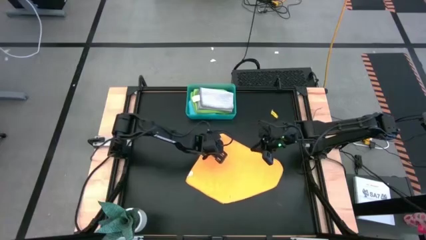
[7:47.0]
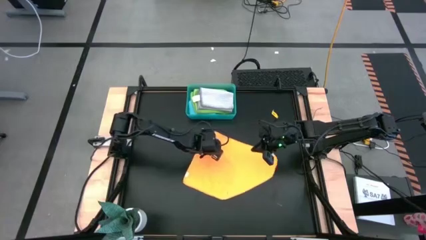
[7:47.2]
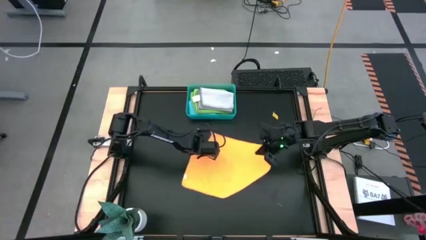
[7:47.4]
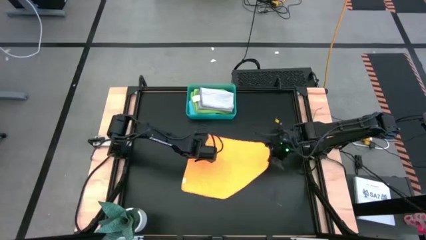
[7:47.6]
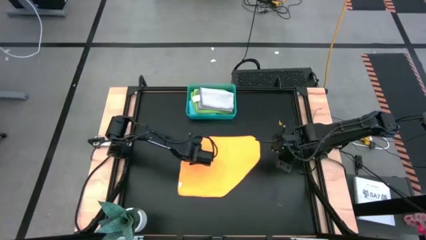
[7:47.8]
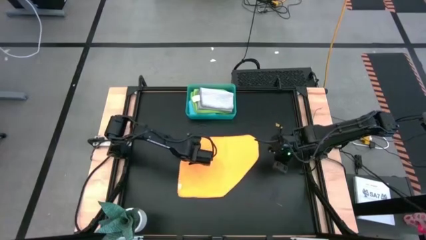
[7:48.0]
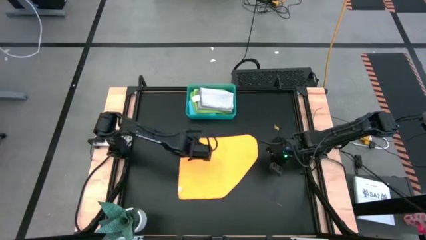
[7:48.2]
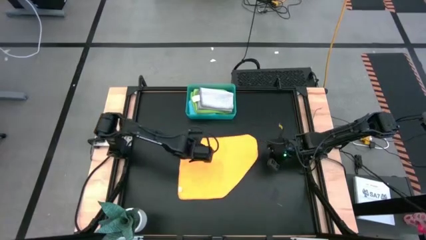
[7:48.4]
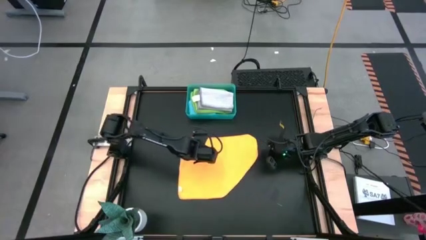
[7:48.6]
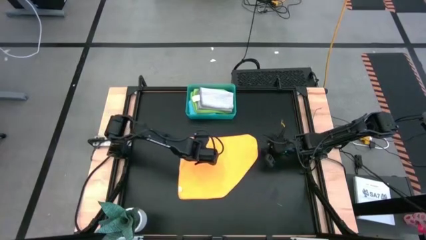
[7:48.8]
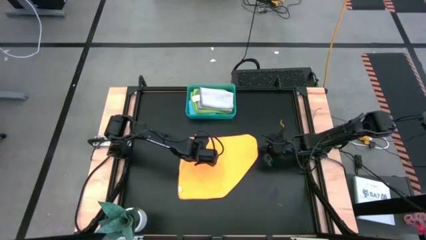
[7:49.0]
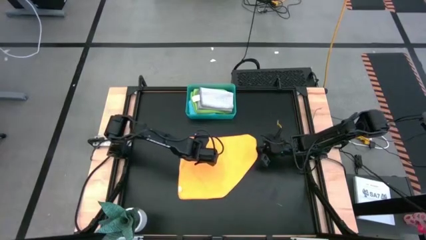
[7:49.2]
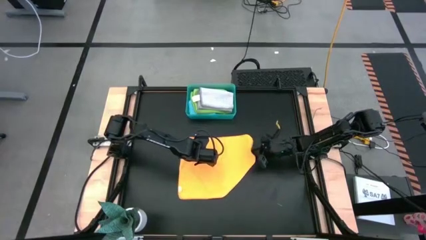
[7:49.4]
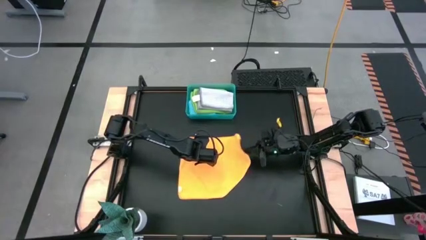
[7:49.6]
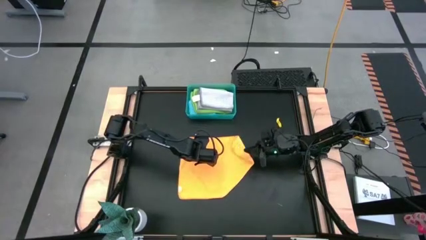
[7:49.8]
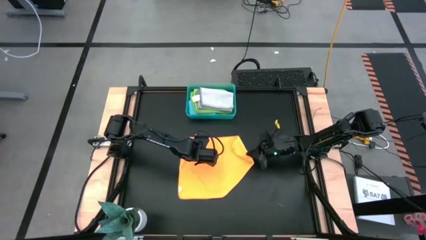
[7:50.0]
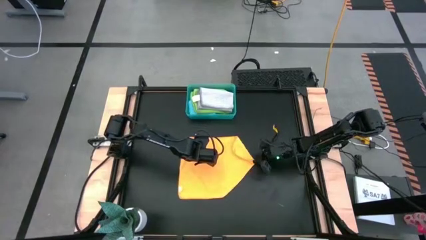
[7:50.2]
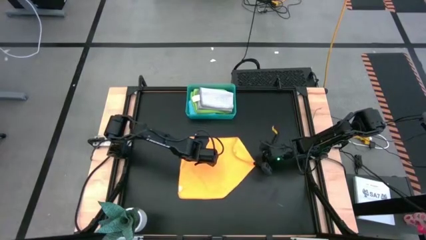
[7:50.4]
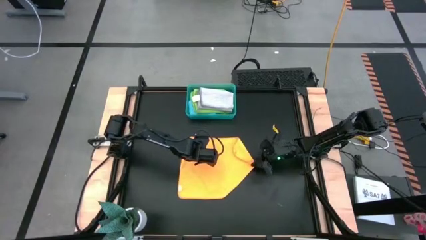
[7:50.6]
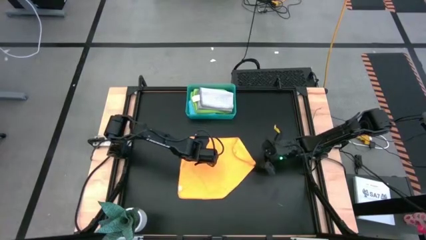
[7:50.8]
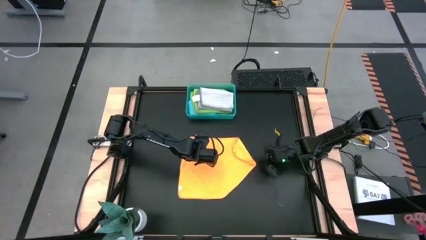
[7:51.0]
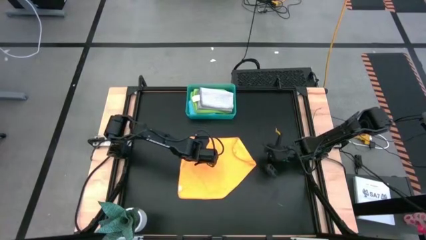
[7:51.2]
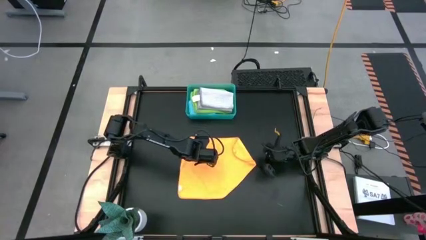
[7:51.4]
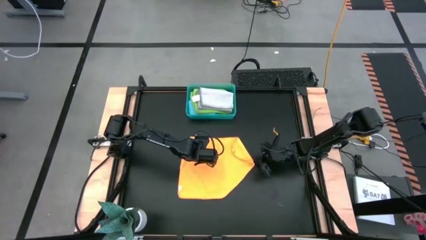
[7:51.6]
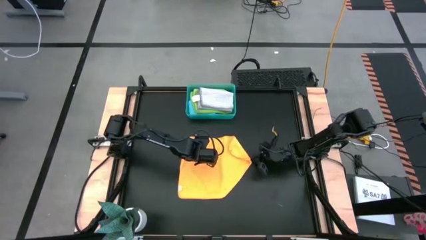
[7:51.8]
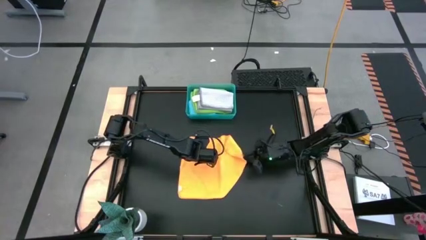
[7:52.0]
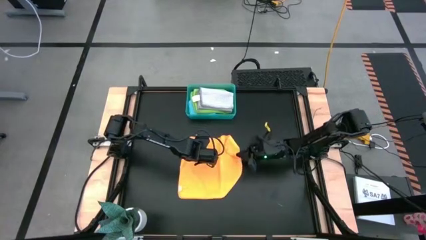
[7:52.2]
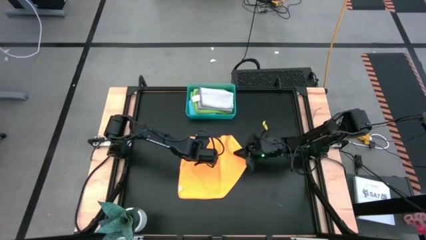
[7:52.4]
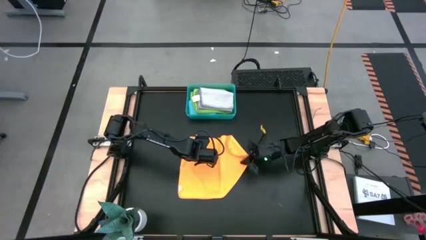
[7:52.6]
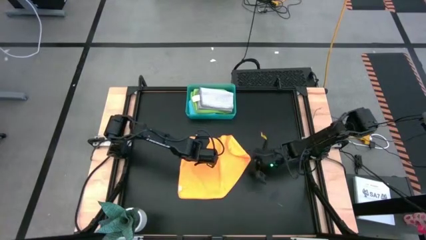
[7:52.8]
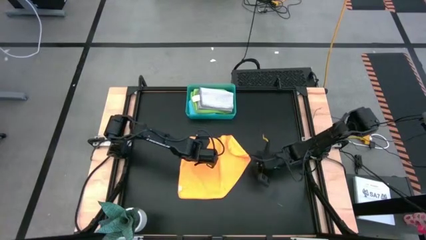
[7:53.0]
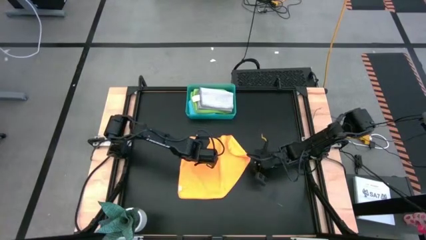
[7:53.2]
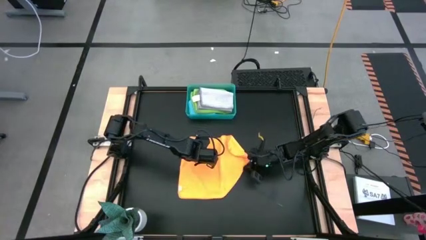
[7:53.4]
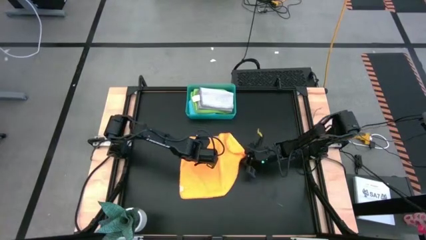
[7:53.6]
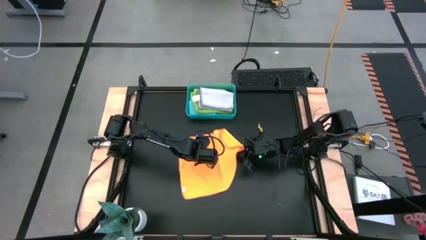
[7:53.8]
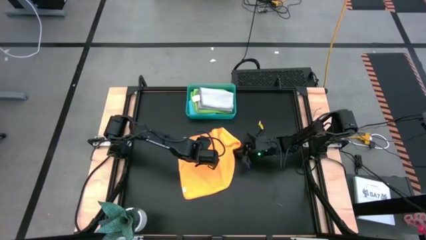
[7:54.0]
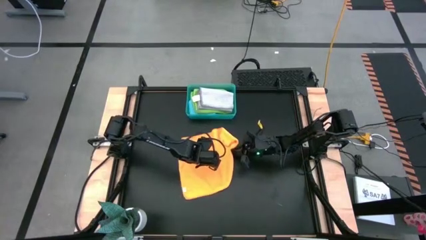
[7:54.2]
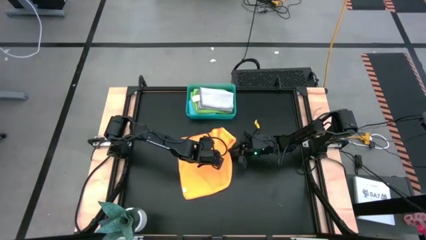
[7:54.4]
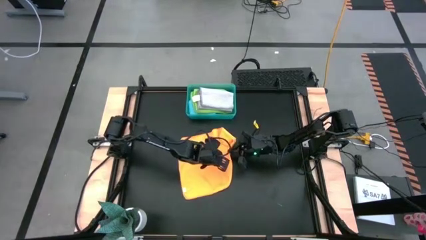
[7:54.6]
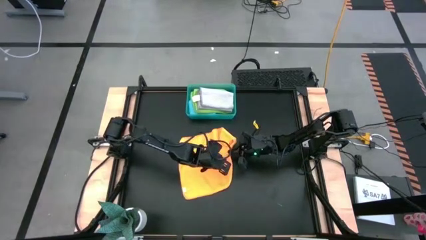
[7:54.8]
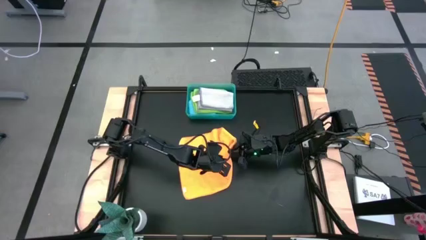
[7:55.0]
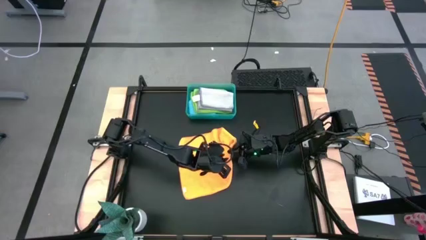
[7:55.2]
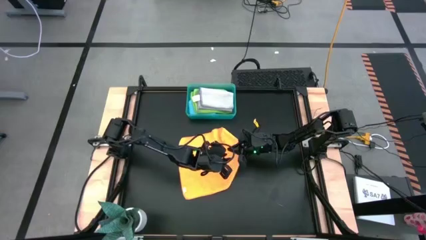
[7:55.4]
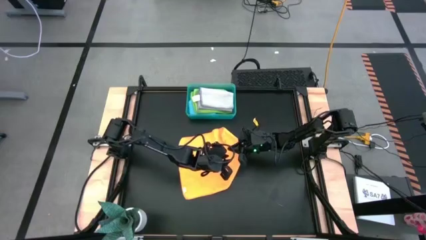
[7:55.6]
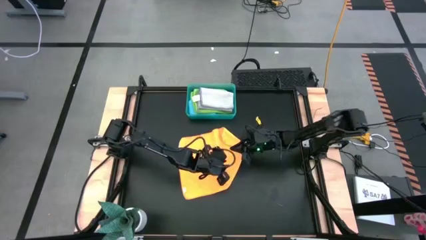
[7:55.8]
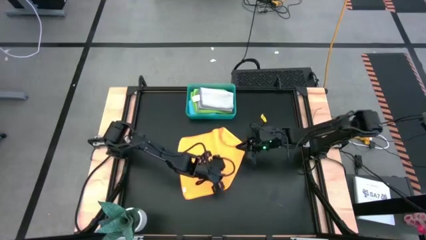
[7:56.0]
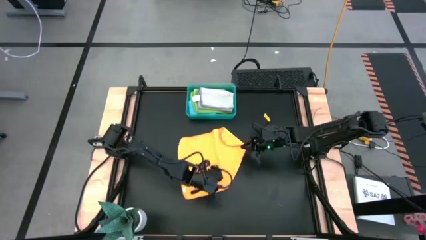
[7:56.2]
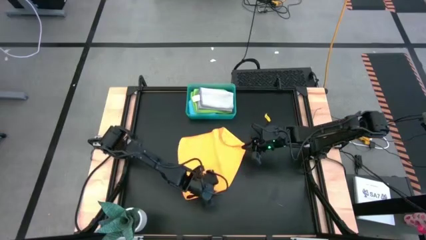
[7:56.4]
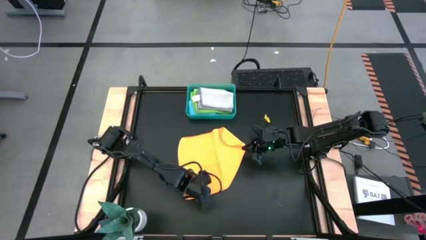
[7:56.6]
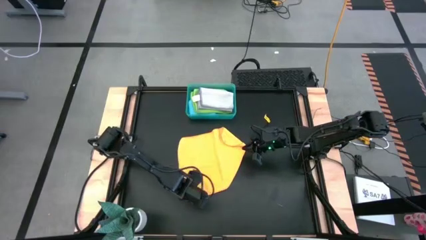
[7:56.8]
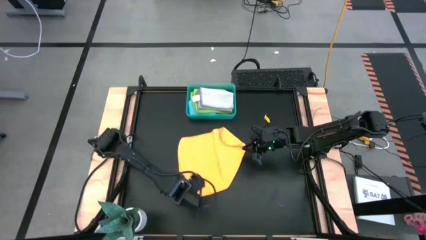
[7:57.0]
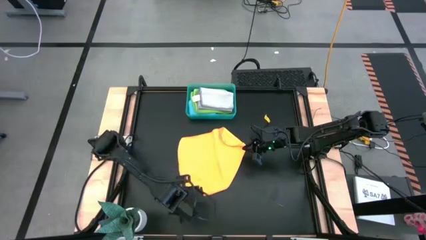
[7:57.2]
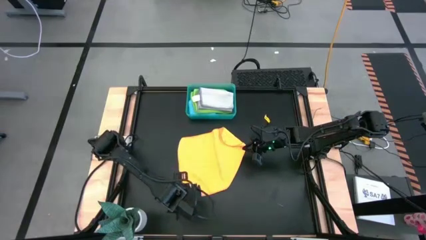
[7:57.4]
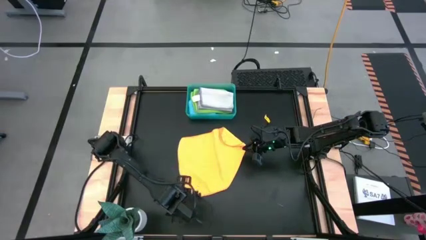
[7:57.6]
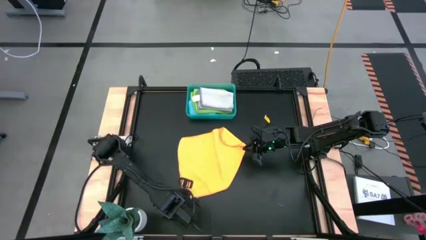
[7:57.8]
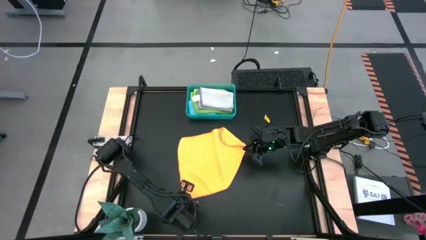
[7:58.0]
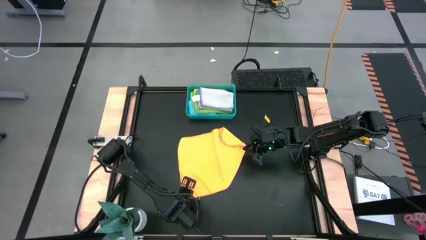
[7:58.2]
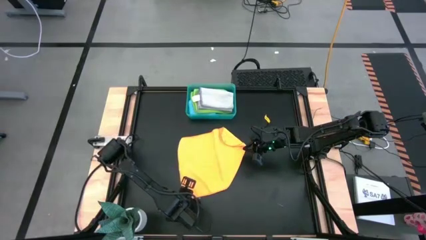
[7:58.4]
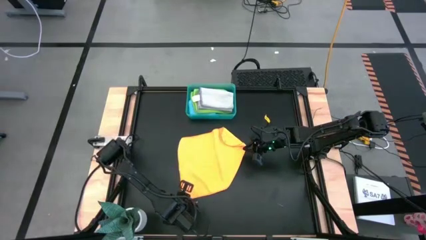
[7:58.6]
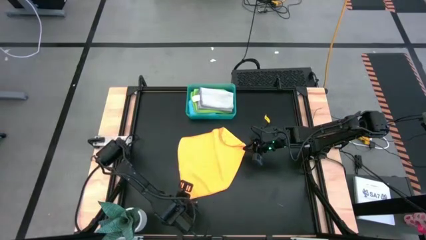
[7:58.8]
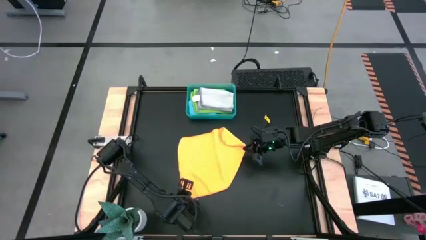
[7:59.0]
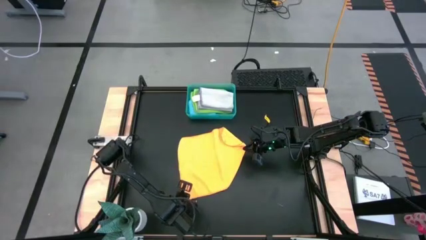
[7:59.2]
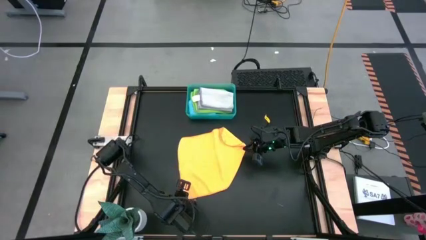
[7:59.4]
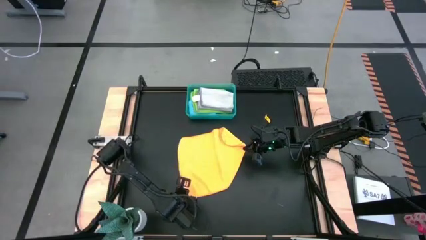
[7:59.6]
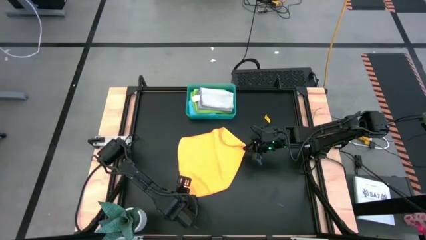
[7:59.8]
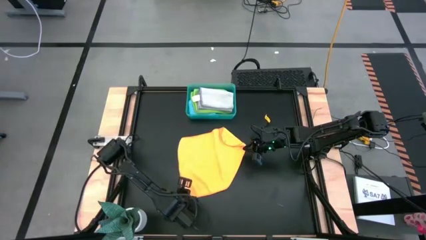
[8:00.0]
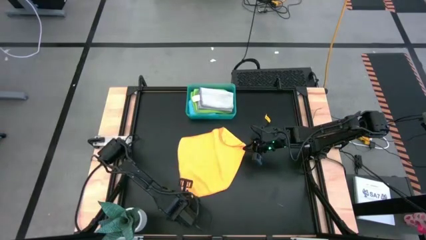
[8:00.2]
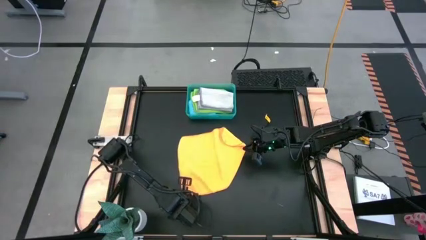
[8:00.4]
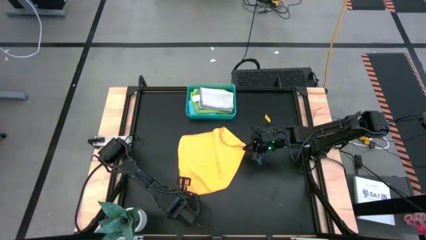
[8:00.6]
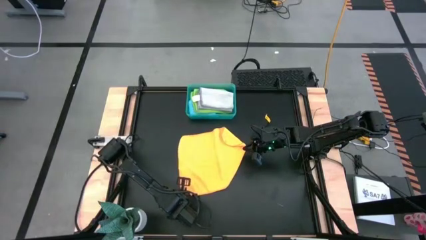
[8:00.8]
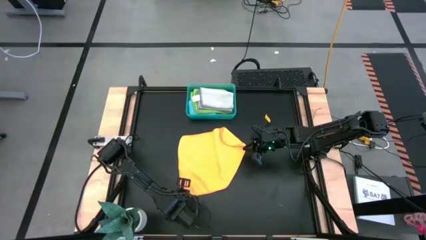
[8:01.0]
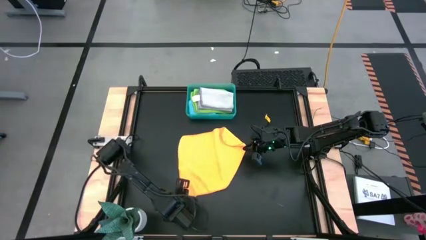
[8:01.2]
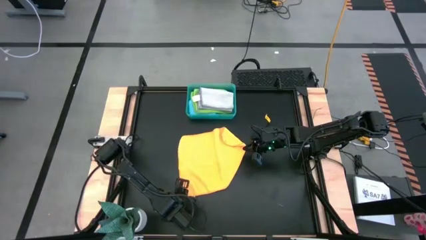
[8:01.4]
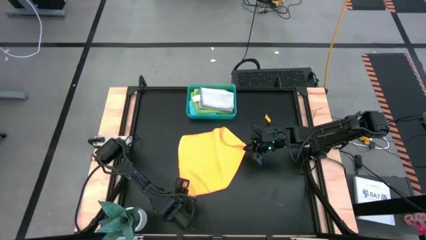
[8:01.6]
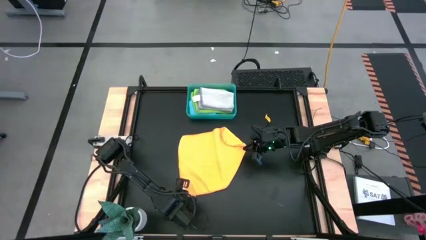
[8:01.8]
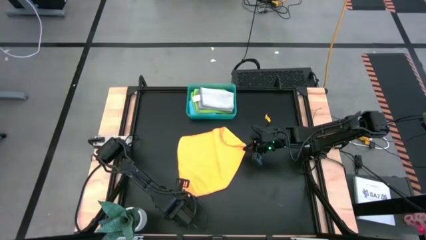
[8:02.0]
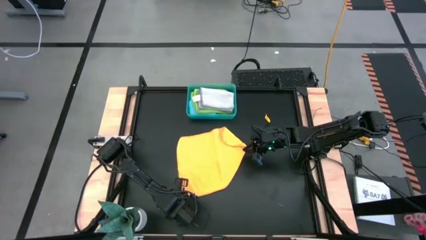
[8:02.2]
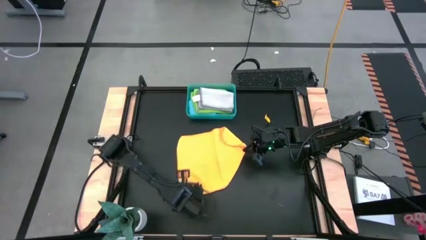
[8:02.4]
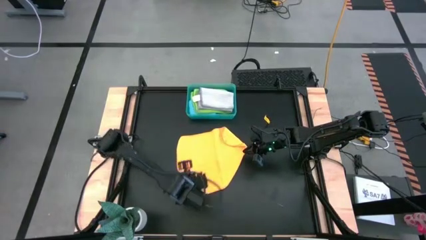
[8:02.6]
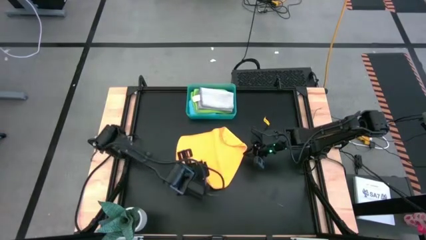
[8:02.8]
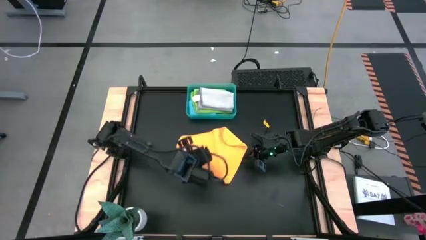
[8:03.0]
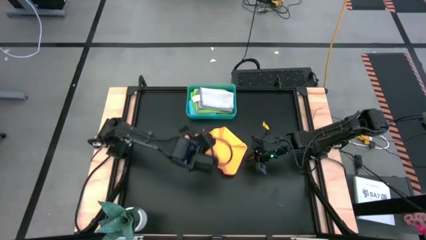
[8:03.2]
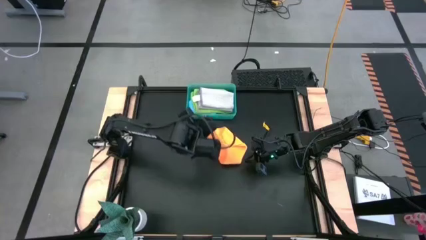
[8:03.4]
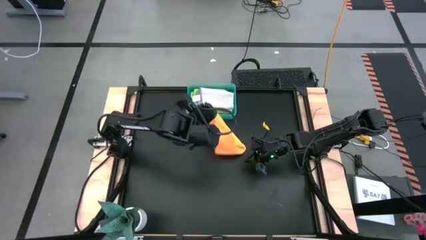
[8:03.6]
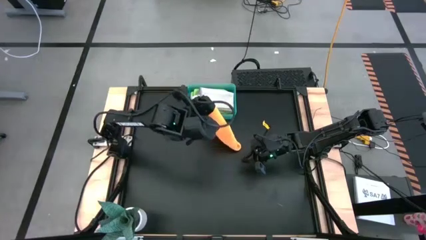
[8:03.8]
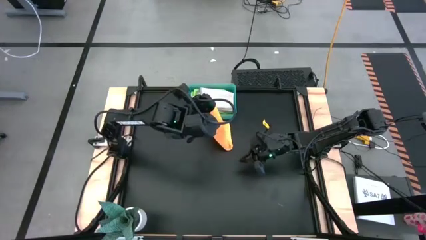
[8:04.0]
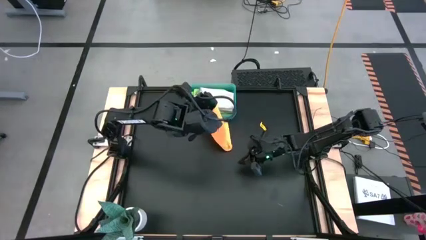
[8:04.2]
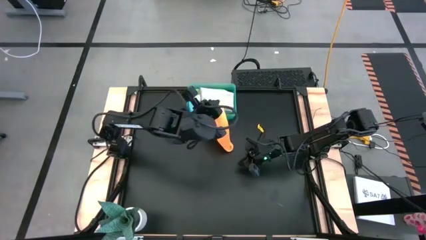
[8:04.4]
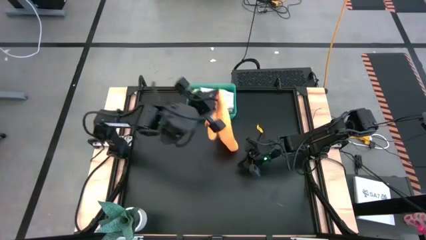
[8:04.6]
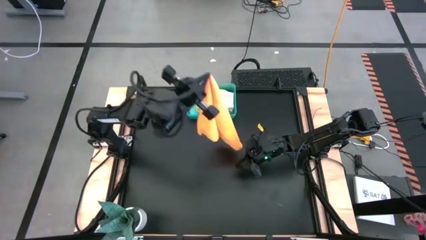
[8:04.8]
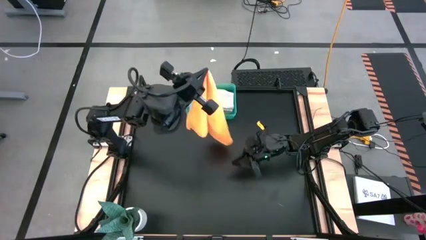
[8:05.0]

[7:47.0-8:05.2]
Task: Fold microfiber towels
Fold the orange microfiber towel
